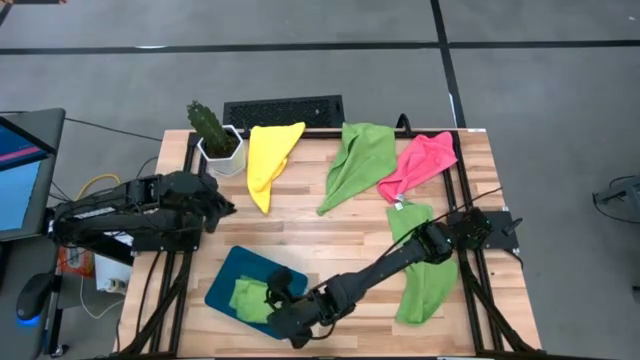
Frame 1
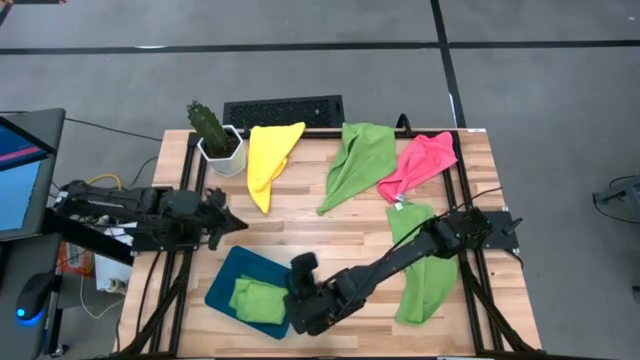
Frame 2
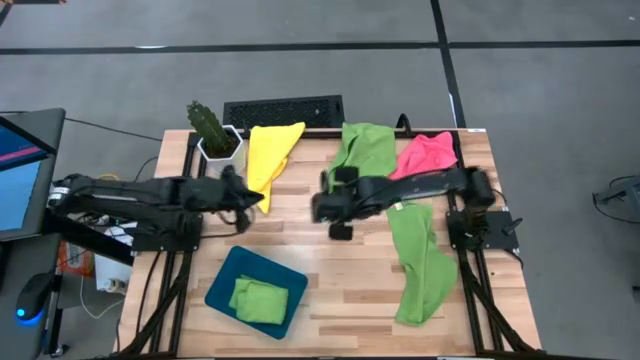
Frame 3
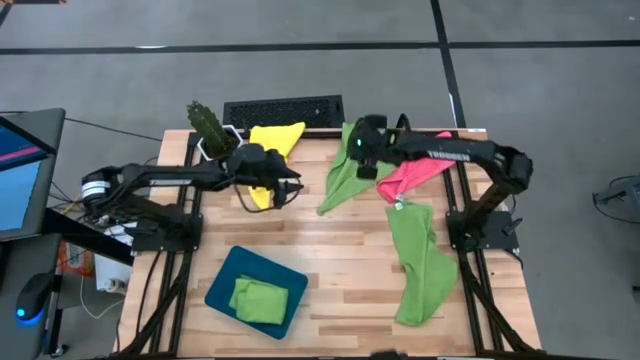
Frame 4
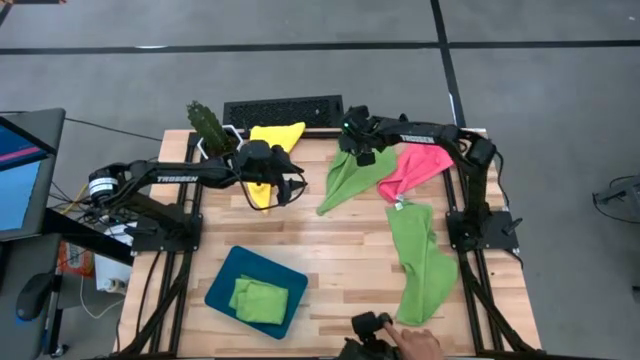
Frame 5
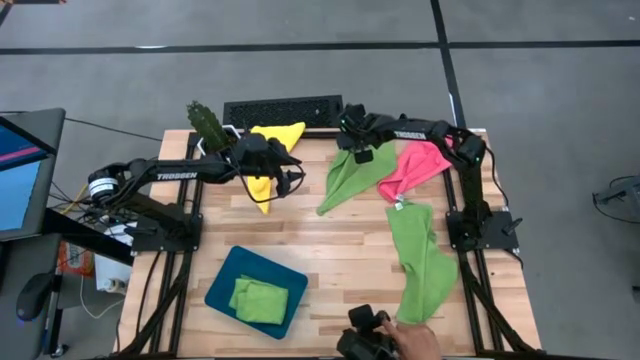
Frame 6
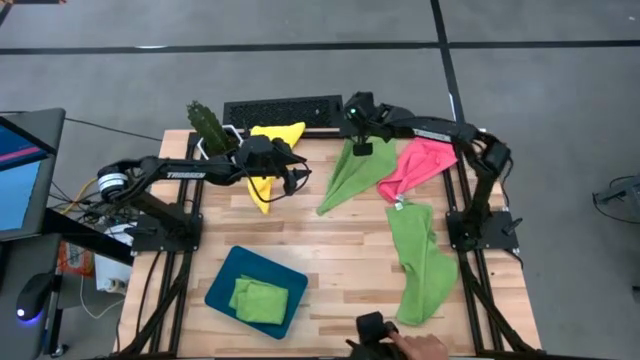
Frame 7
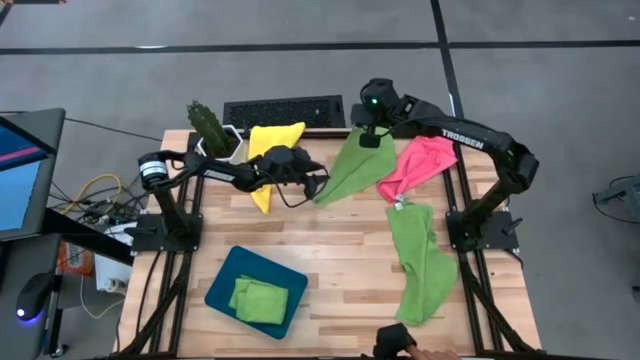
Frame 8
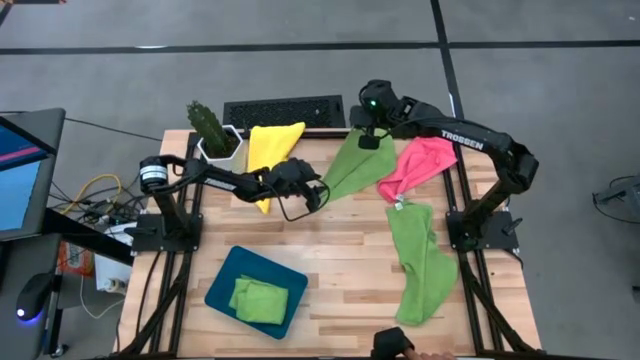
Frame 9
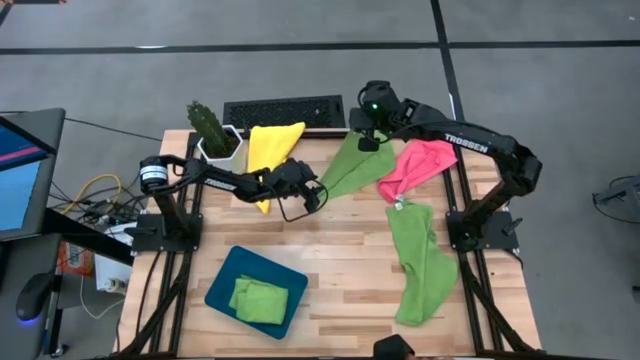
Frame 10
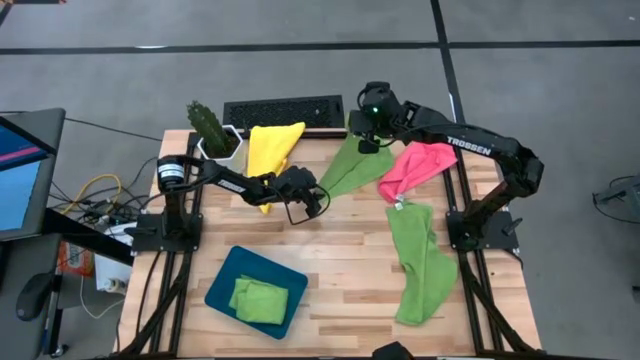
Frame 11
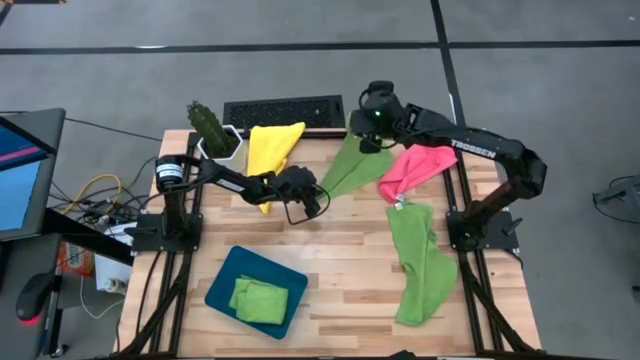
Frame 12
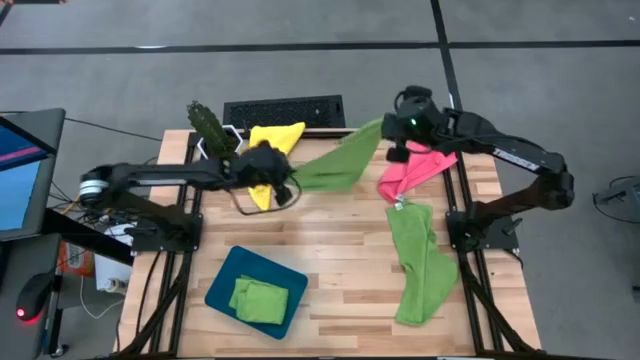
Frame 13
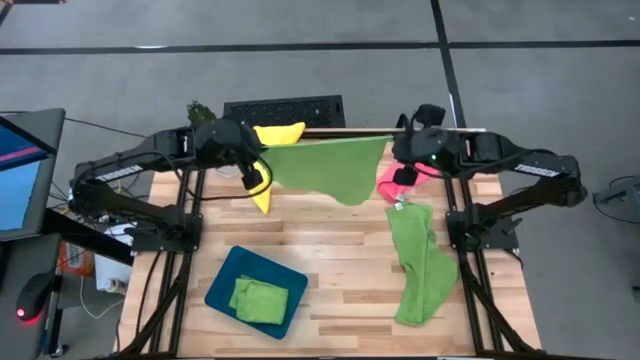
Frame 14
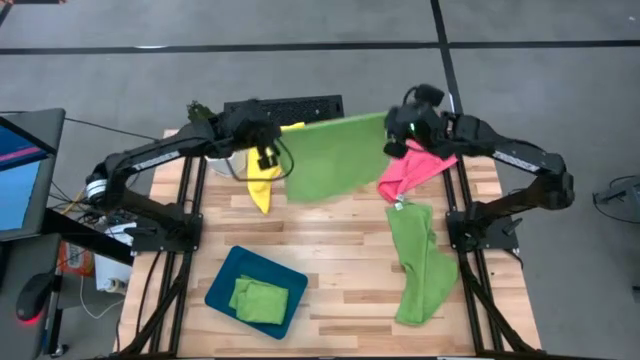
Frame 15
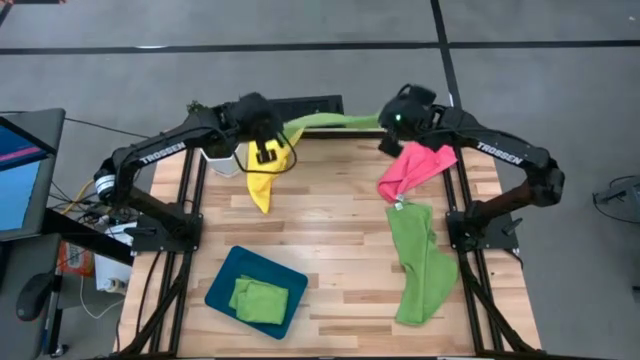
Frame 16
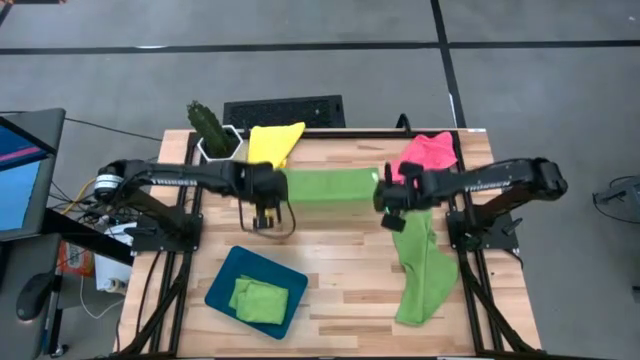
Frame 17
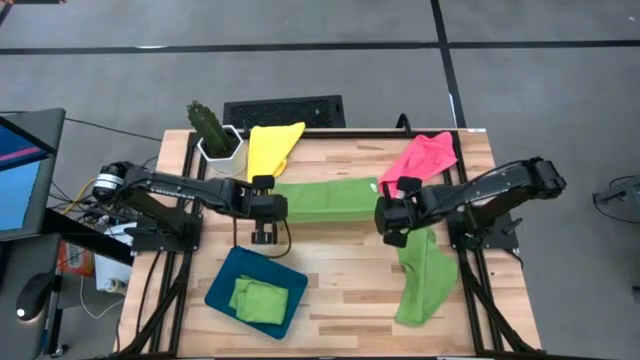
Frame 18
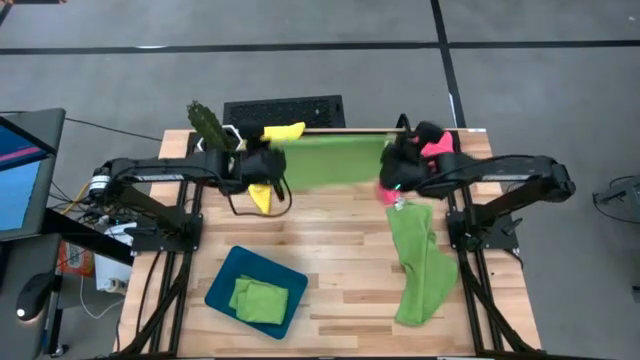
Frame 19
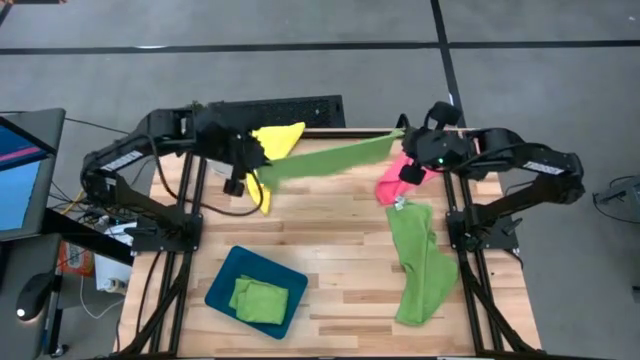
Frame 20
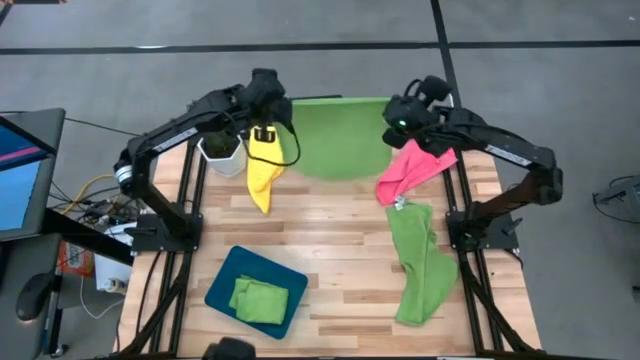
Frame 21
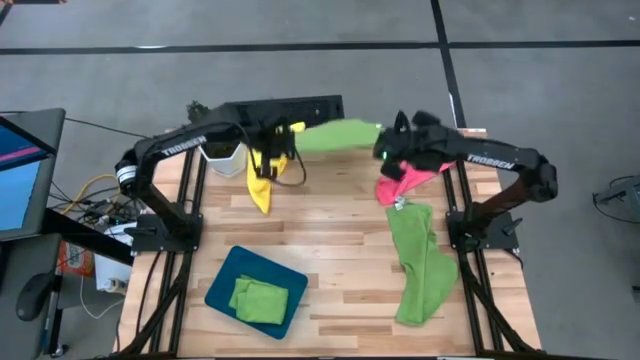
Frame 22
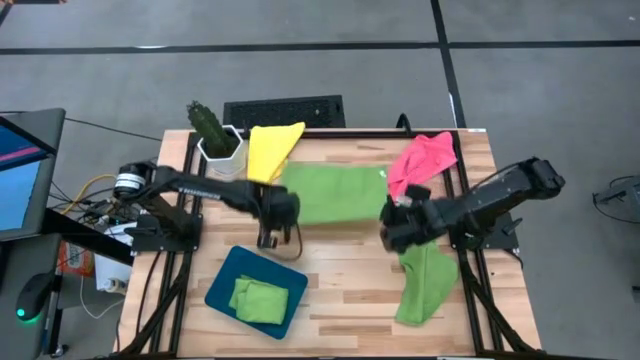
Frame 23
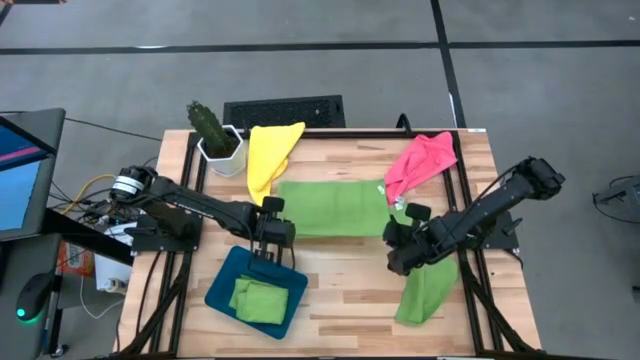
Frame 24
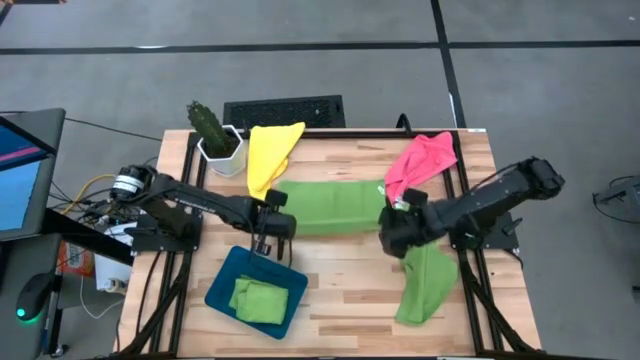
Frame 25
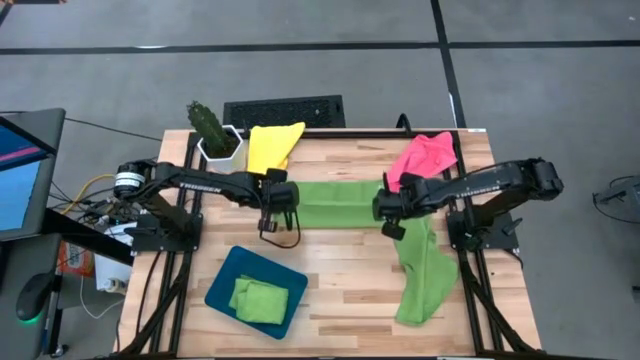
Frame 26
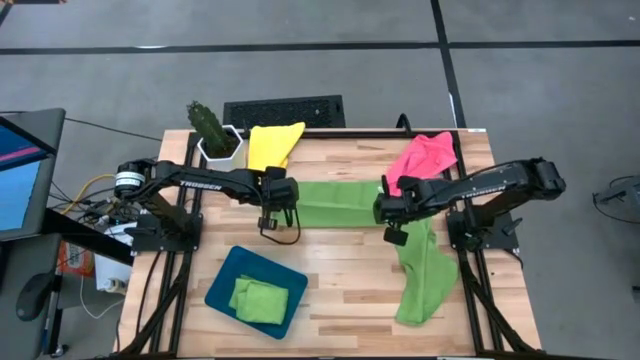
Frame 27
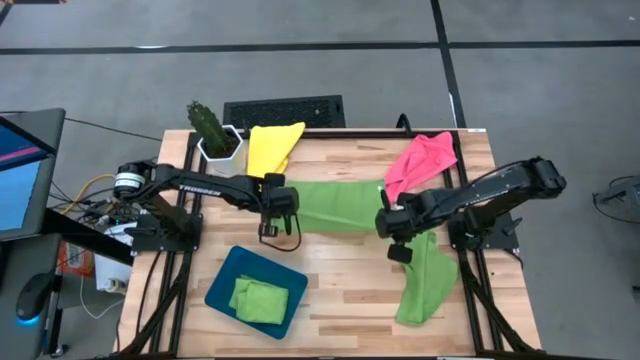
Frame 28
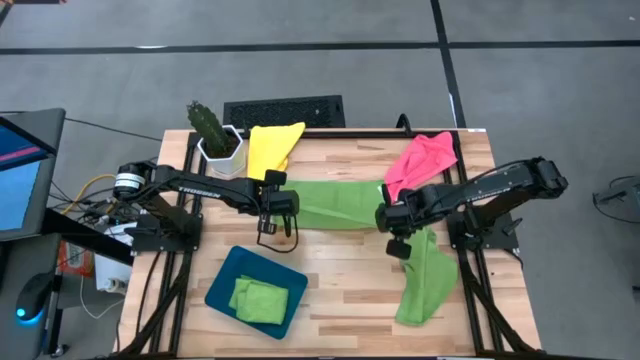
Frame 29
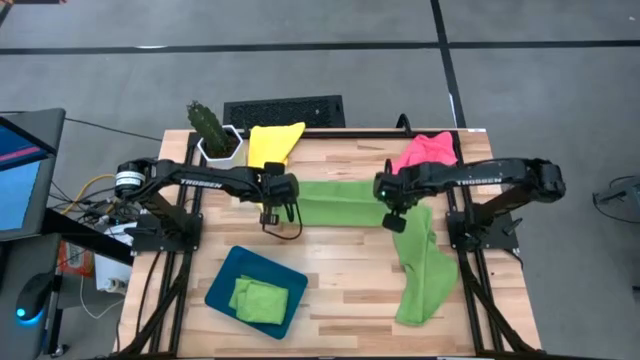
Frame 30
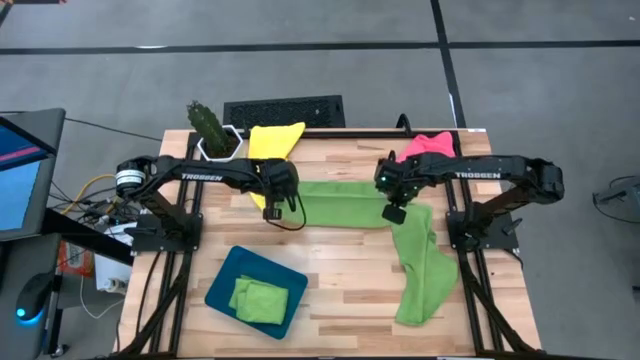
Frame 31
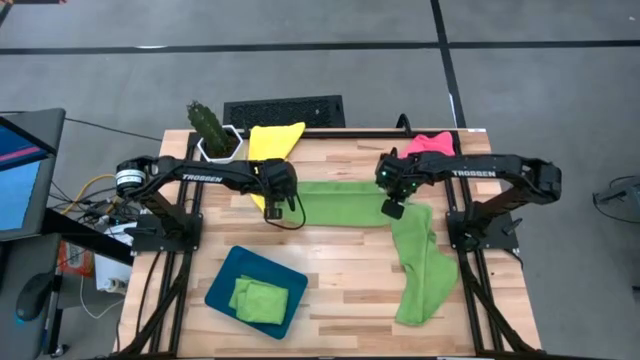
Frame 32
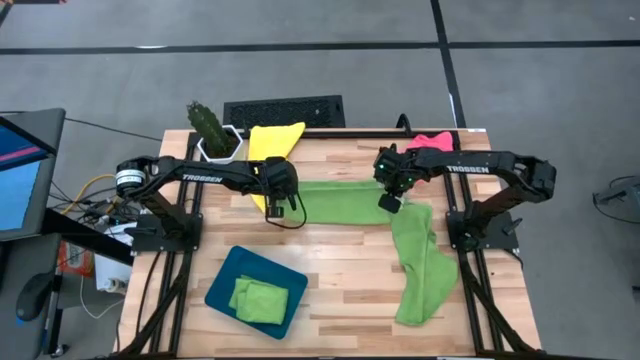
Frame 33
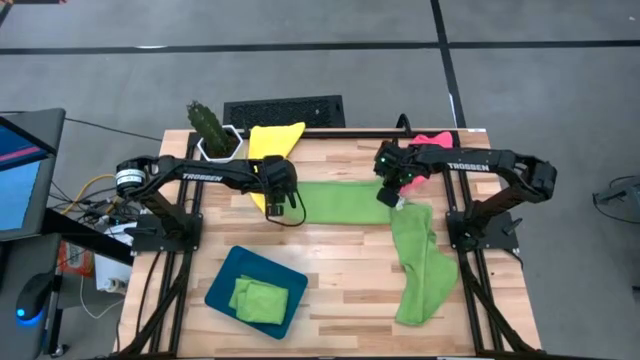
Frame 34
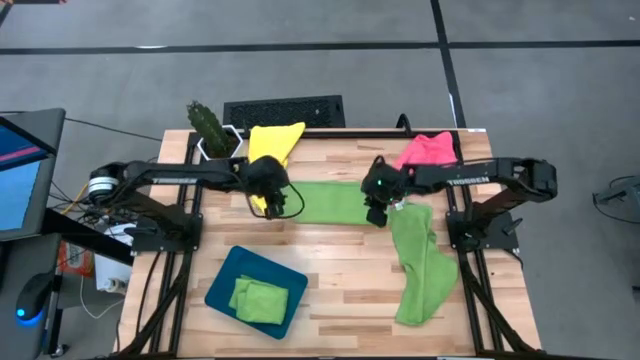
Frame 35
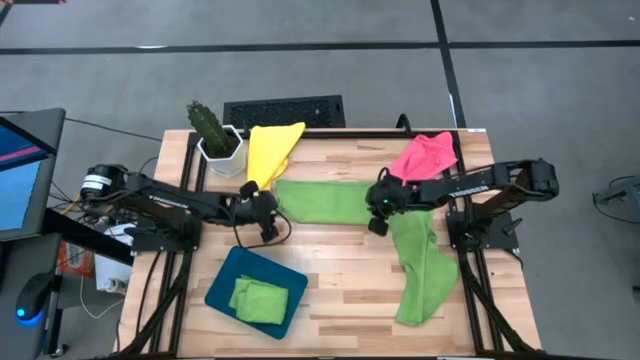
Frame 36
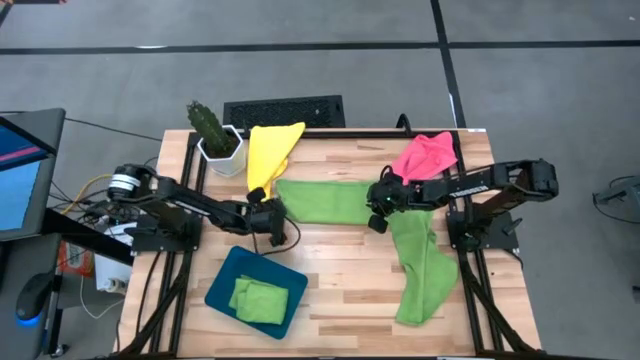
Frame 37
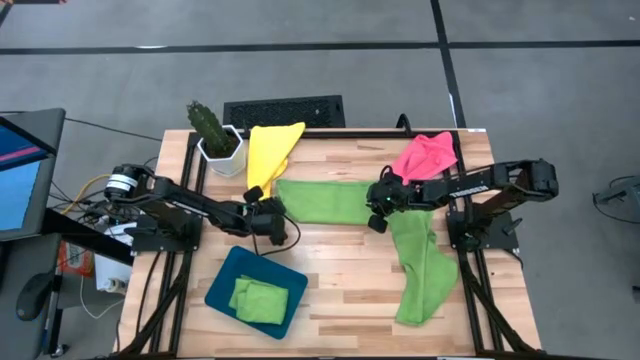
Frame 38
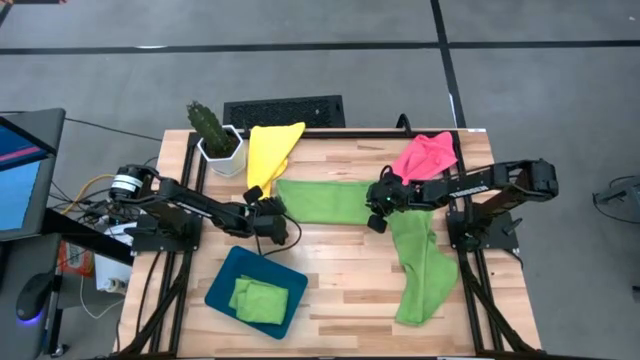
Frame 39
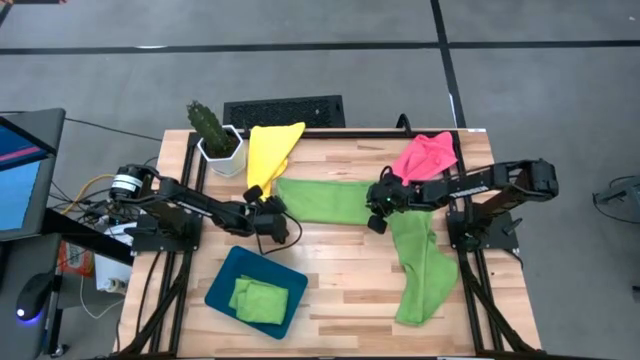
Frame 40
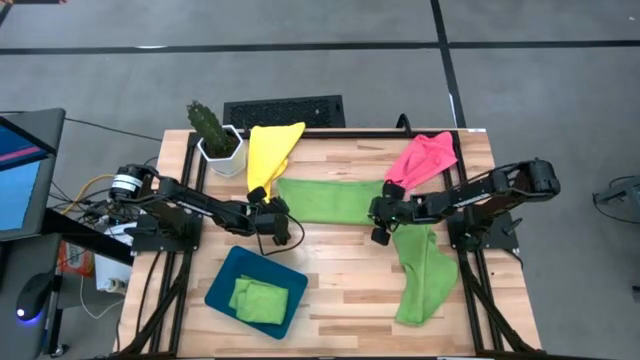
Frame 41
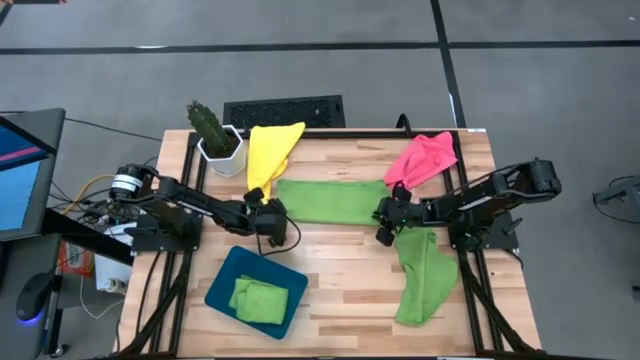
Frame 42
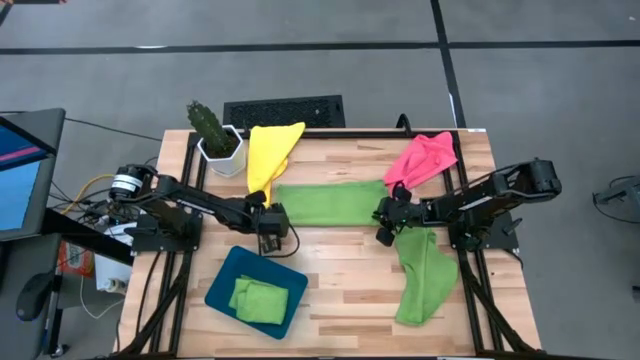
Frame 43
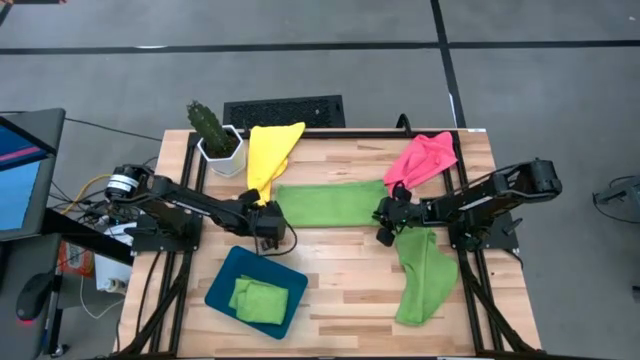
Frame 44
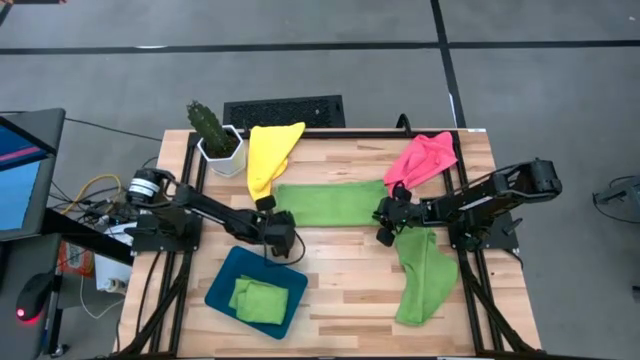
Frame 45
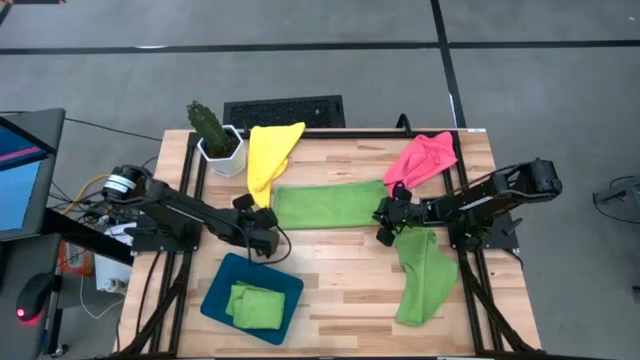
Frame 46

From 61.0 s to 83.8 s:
Task: Fold microfiber towels
Fold the top green microfiber
